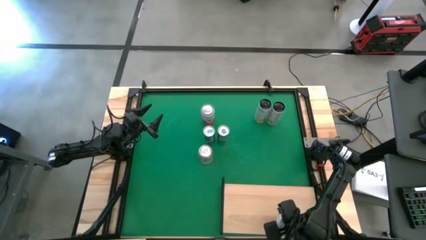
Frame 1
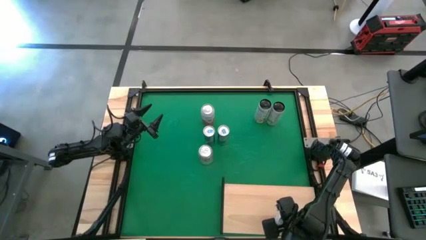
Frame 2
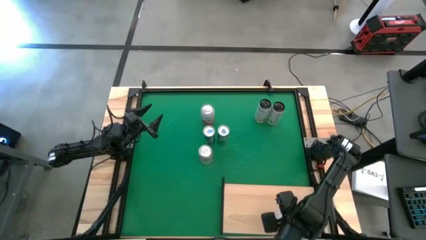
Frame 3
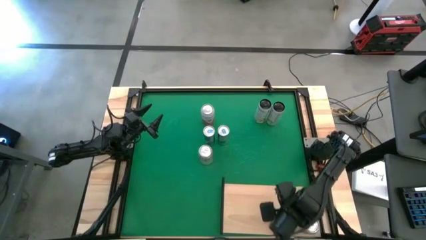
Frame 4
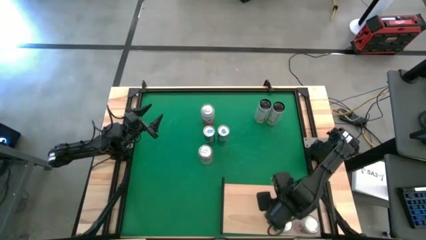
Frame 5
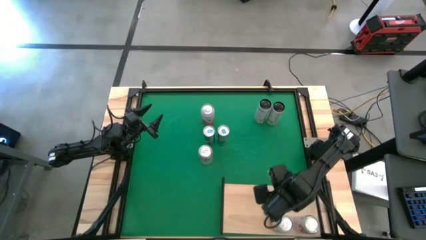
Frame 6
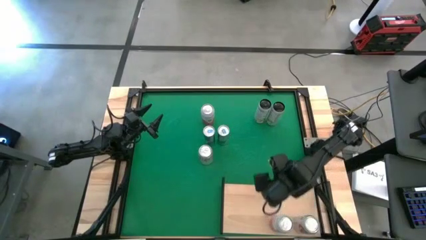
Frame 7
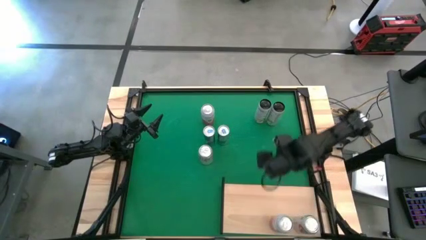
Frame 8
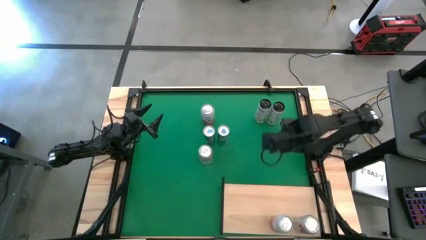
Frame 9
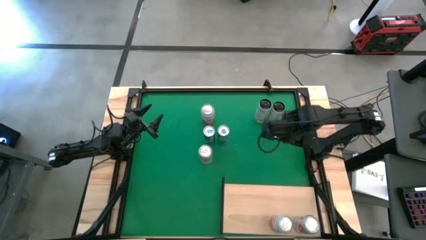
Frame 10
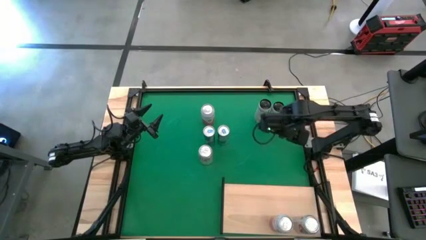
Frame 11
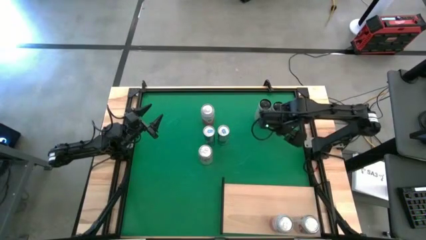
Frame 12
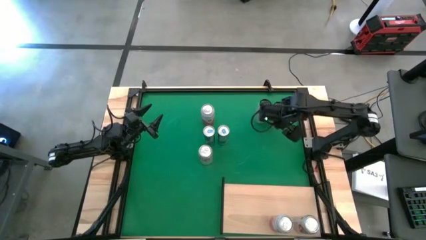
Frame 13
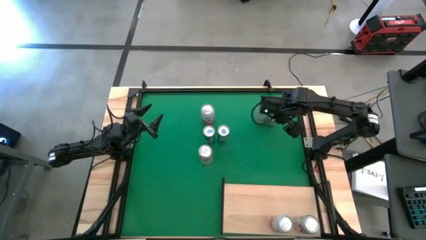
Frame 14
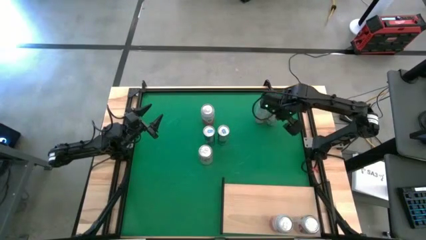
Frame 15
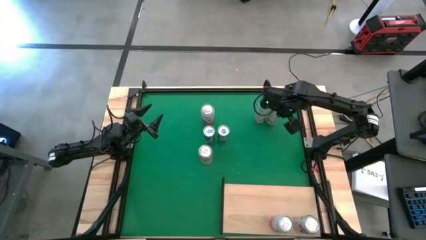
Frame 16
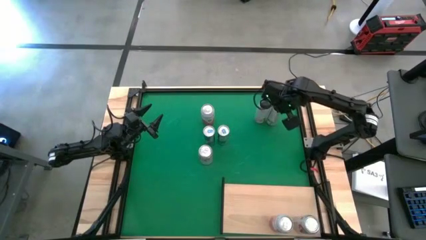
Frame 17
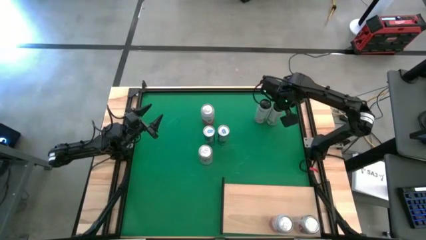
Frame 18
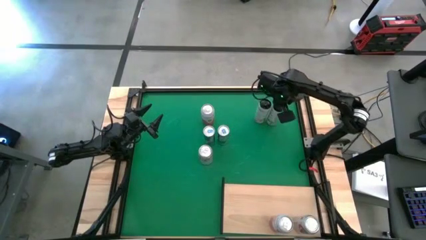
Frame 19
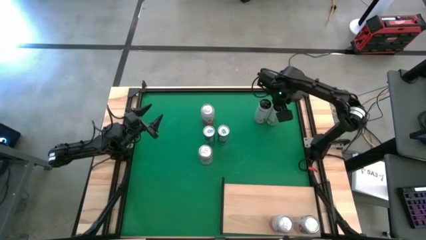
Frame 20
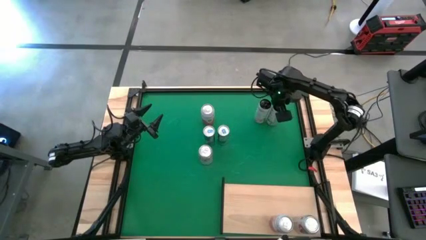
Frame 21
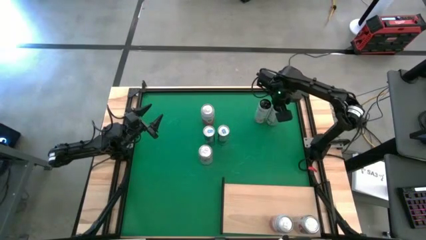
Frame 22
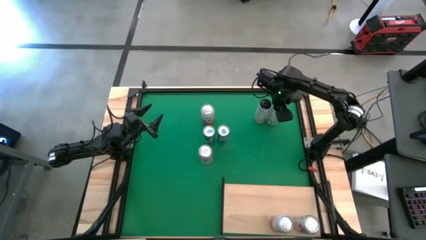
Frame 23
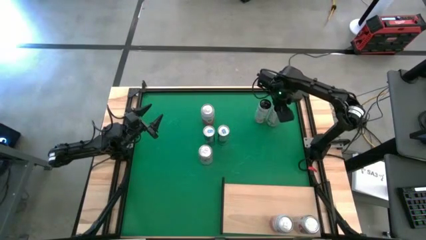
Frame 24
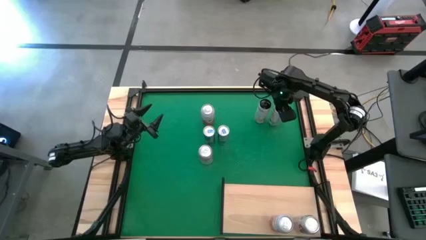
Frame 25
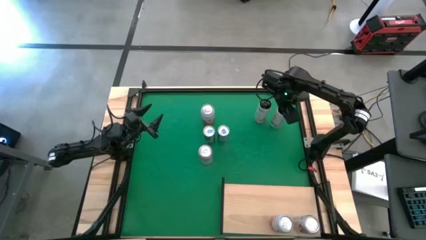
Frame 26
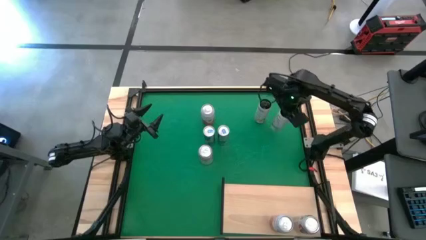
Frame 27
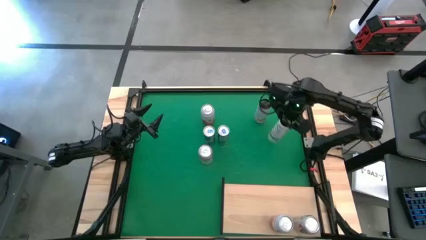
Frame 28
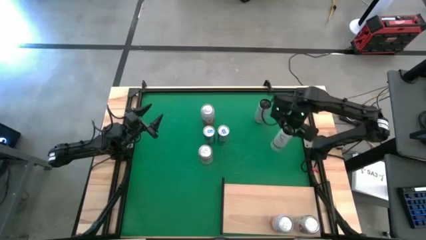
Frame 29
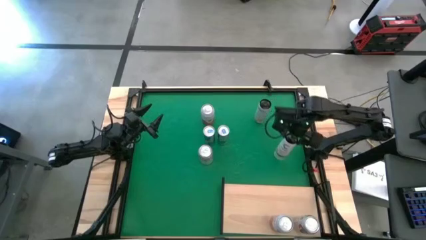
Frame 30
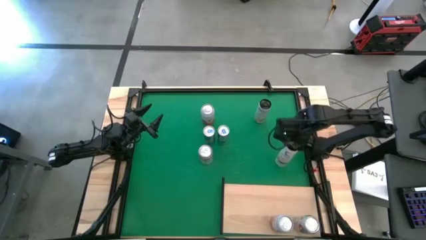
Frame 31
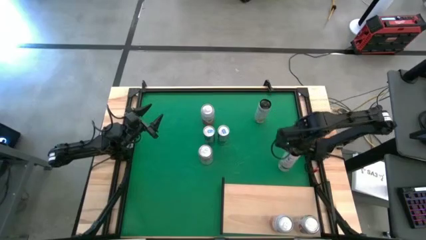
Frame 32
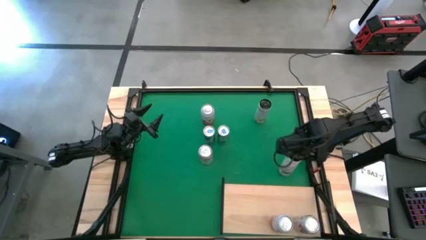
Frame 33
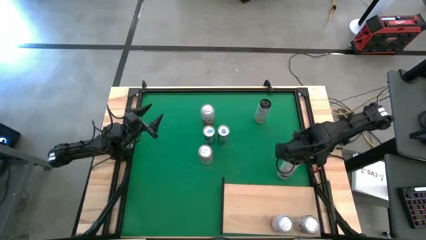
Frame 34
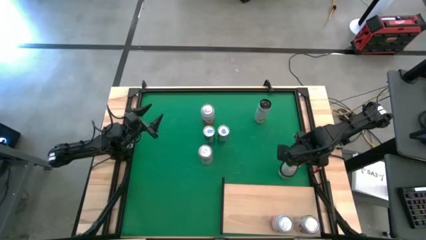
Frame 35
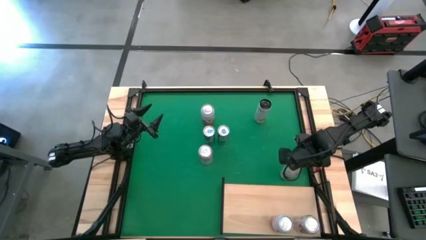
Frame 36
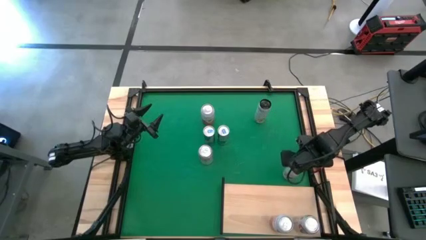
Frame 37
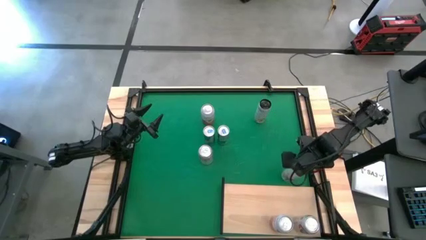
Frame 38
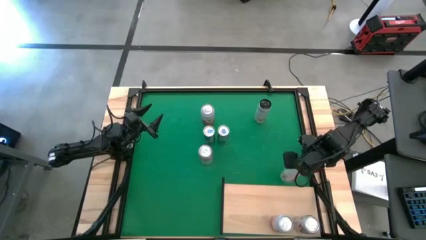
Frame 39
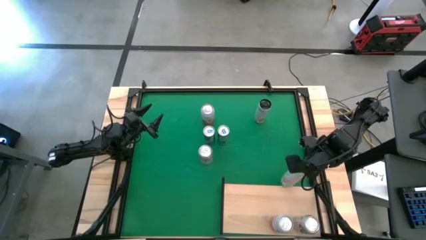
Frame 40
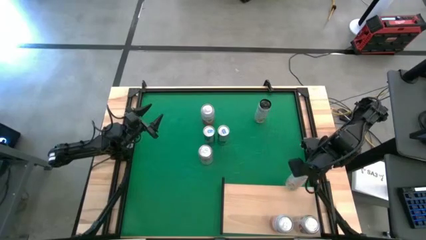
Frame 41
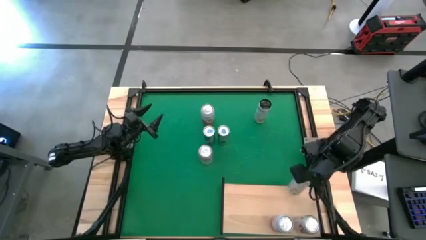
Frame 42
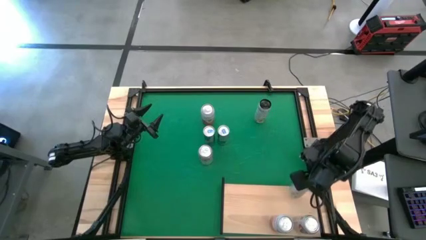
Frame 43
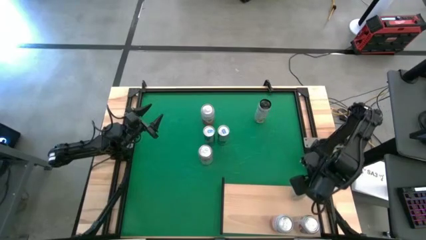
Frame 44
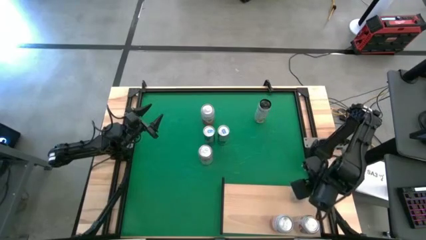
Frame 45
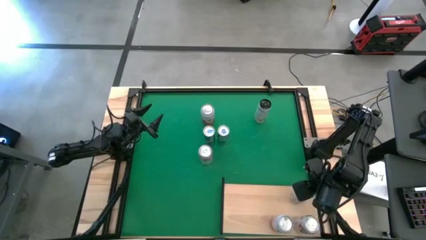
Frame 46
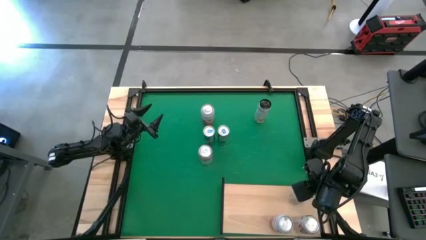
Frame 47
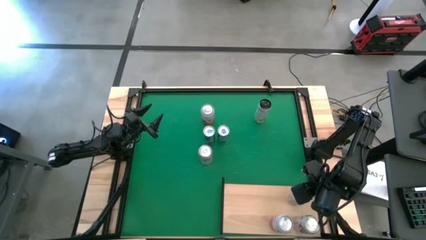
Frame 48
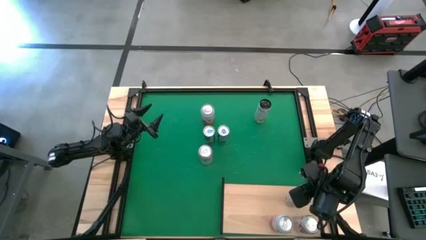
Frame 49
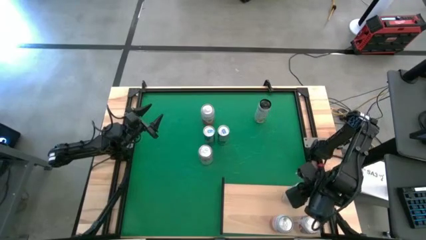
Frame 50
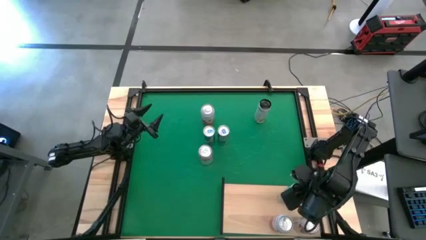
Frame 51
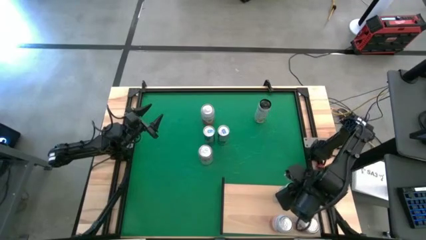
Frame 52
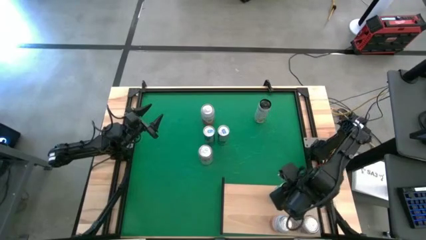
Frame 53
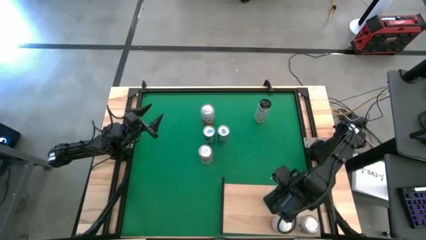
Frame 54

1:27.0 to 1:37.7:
Task: Place canned beverage on shelf
Put the right white-yellow soda can on the shelf

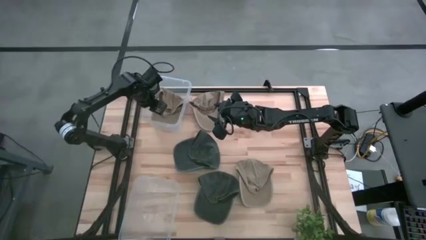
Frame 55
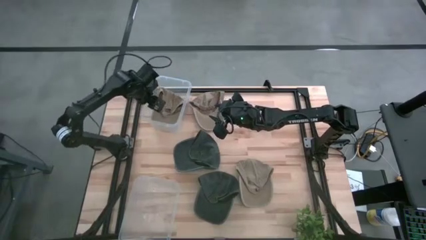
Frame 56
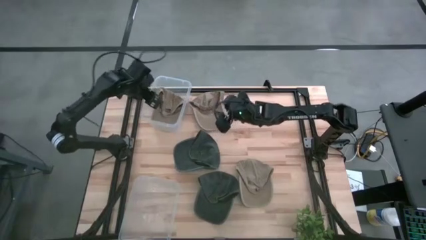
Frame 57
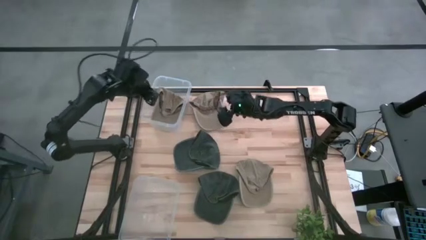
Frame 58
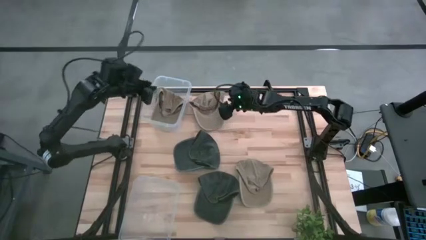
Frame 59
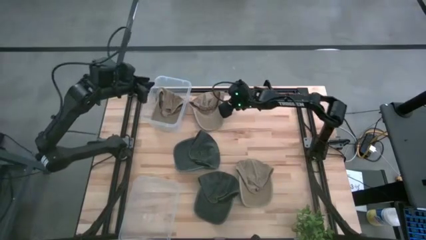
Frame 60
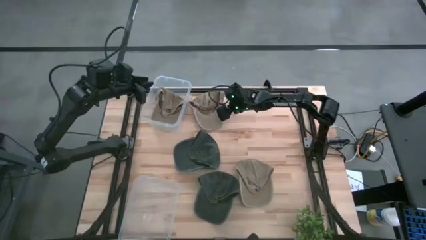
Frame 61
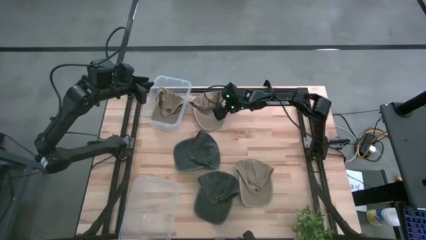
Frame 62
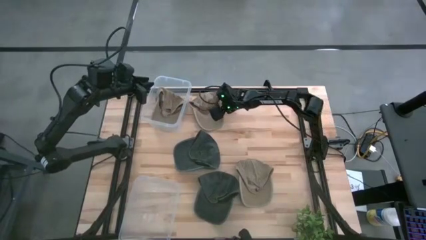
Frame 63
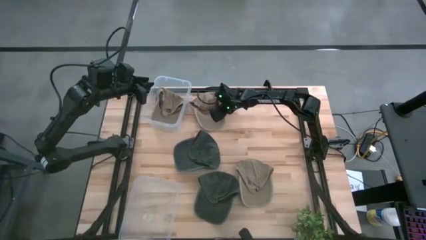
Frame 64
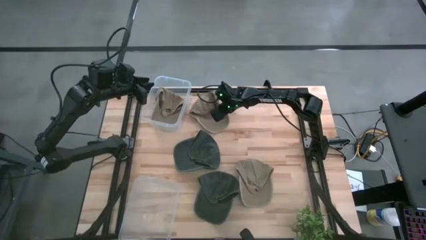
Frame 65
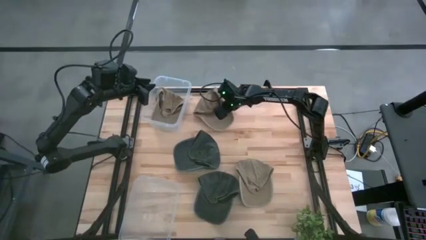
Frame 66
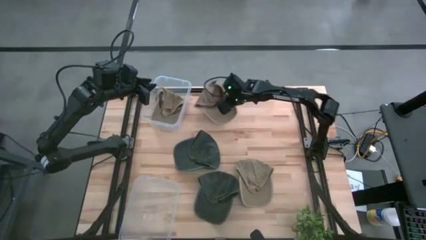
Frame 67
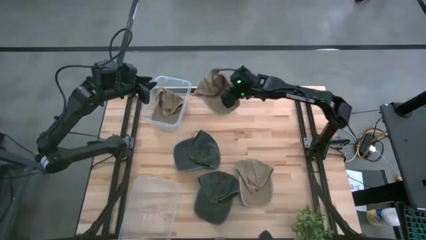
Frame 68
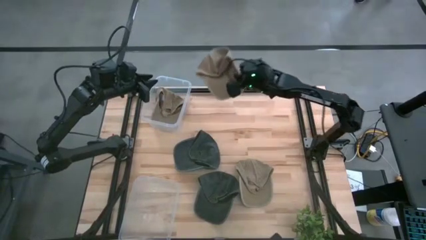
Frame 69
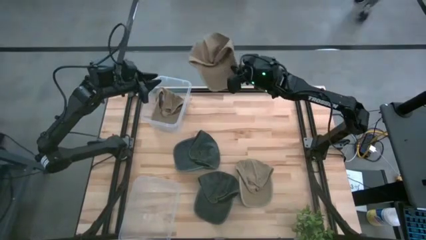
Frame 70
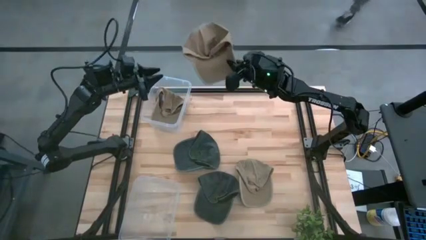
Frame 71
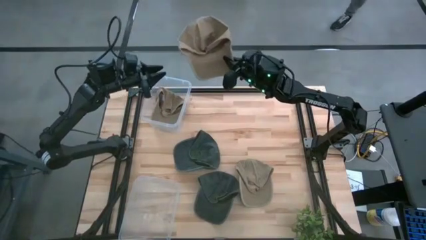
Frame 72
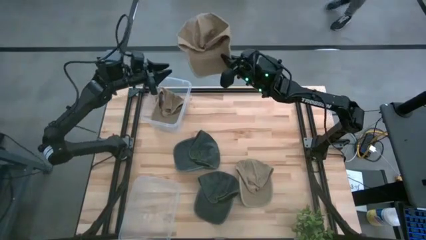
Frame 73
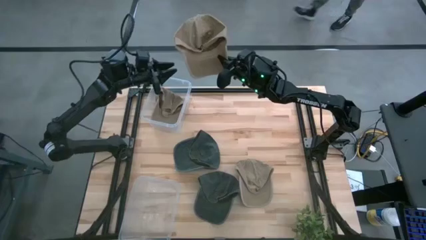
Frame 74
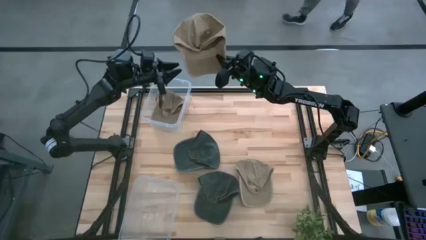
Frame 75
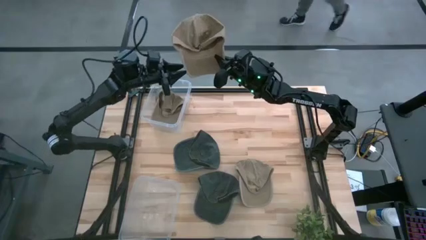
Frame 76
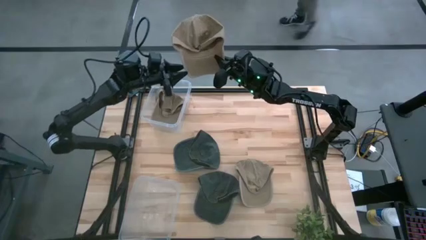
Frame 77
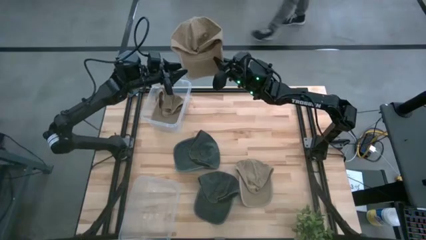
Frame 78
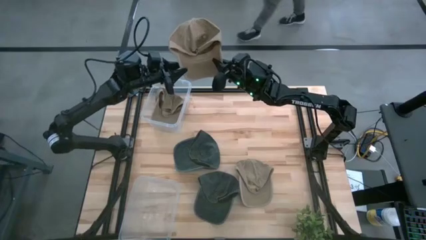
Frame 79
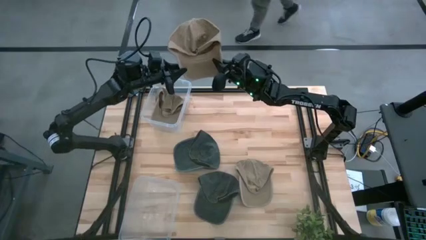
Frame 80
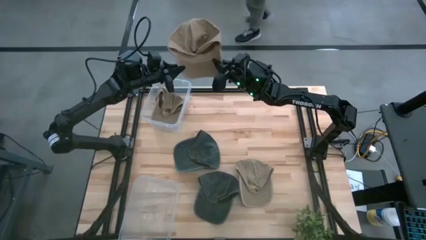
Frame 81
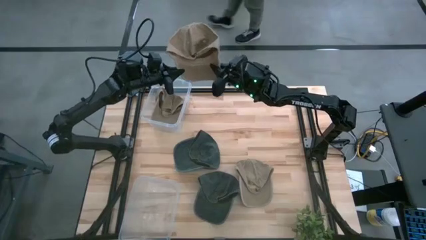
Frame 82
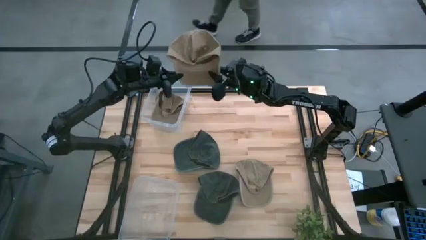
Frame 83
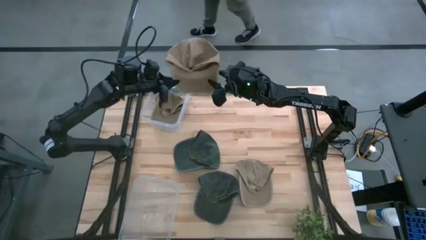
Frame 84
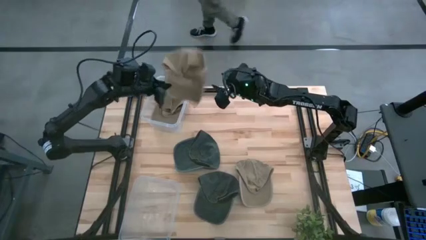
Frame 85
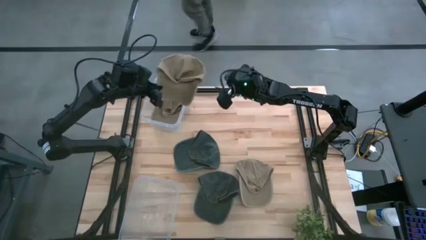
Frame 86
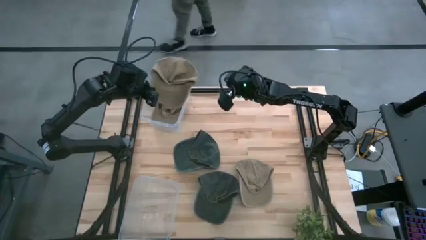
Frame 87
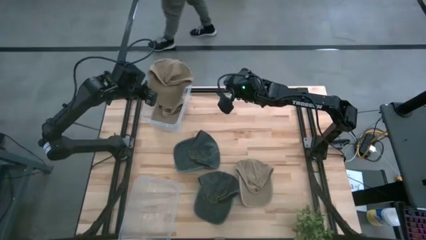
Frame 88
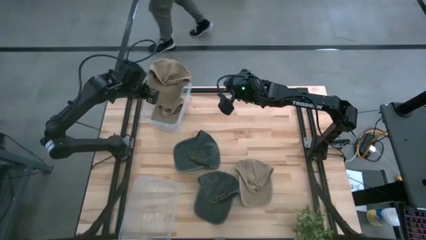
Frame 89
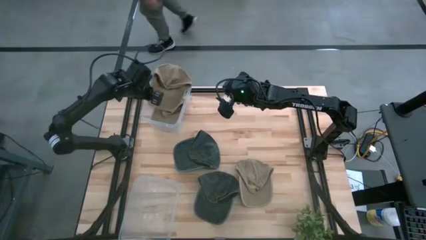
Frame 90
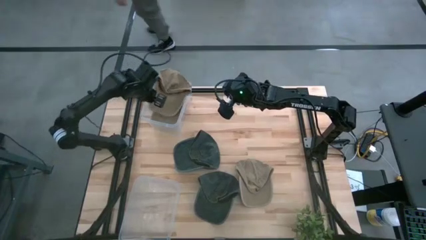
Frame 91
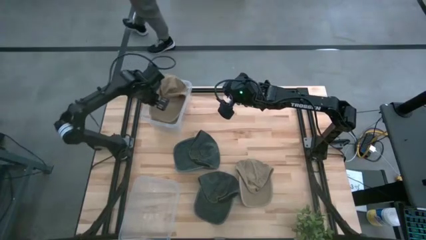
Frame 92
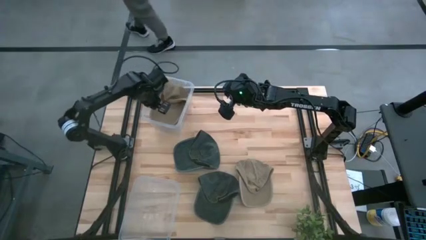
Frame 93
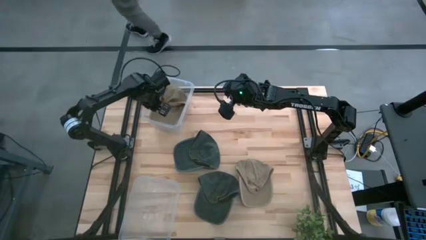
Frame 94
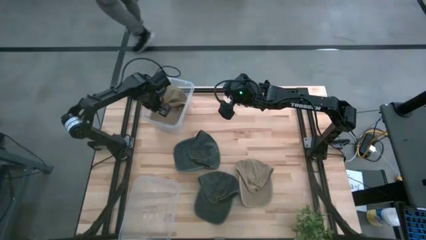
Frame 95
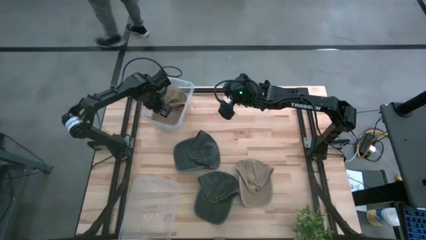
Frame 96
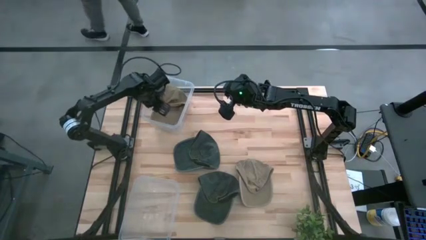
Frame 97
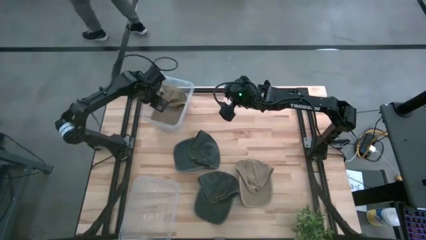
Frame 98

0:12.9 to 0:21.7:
Task: Pick and place caps into container
Put the top brown cap into the top transparent container
